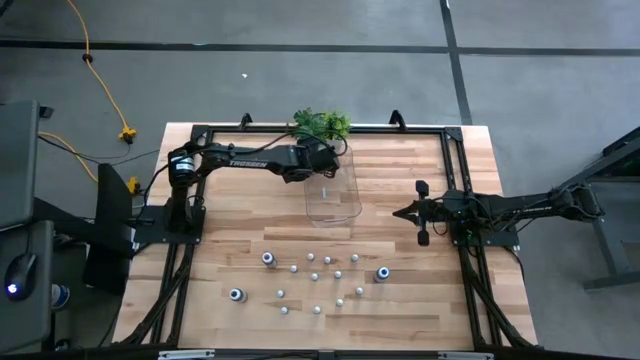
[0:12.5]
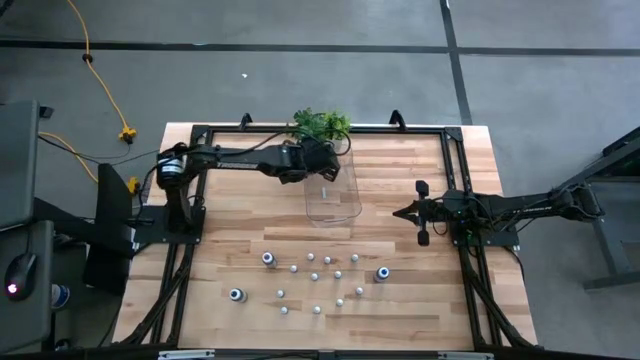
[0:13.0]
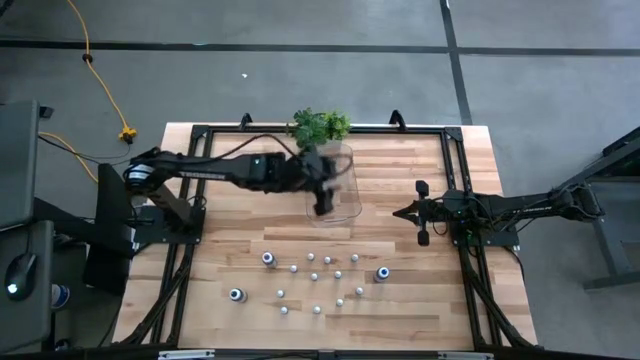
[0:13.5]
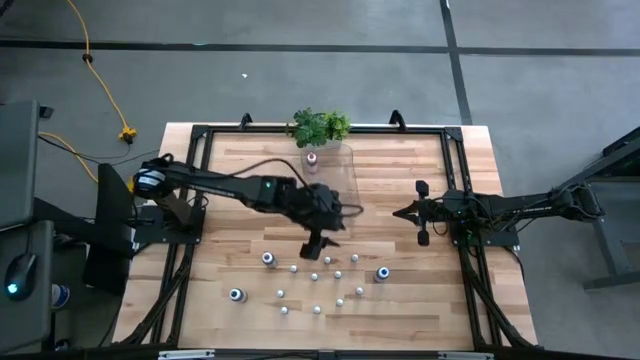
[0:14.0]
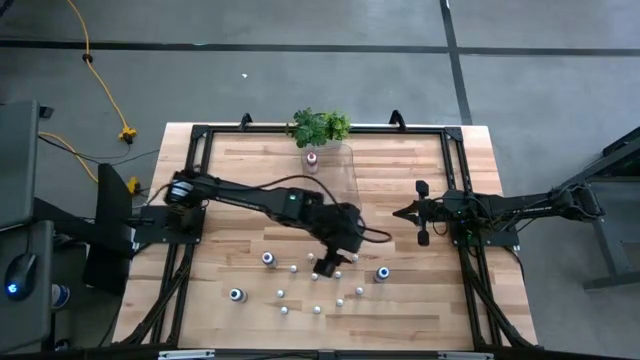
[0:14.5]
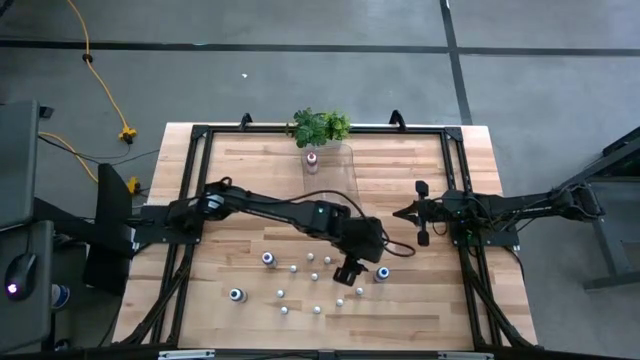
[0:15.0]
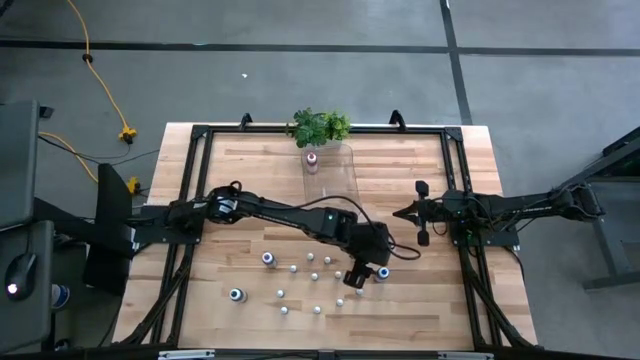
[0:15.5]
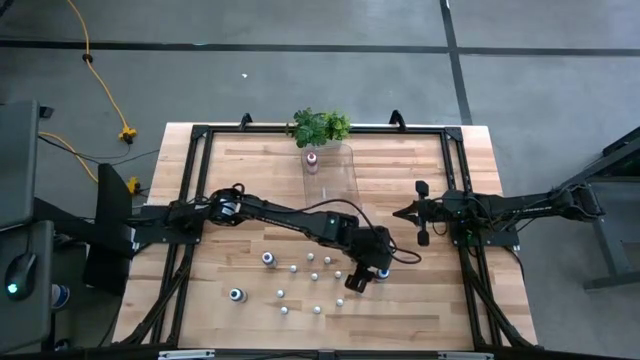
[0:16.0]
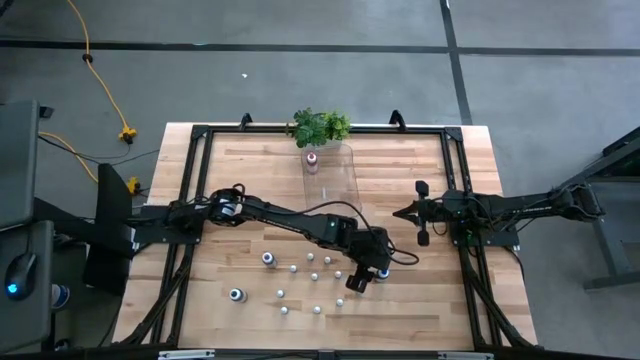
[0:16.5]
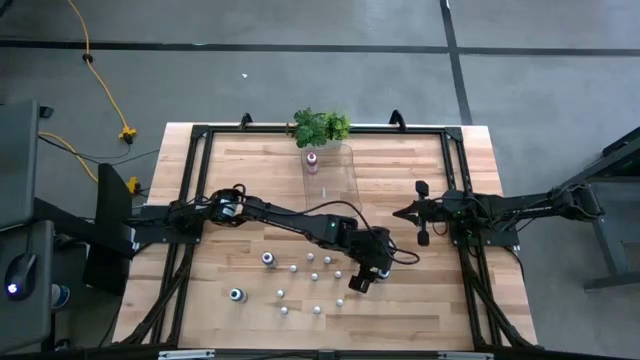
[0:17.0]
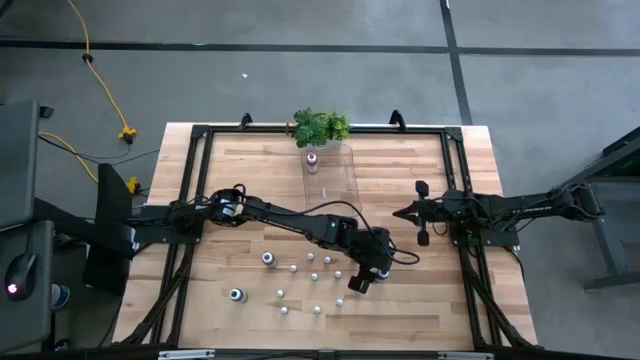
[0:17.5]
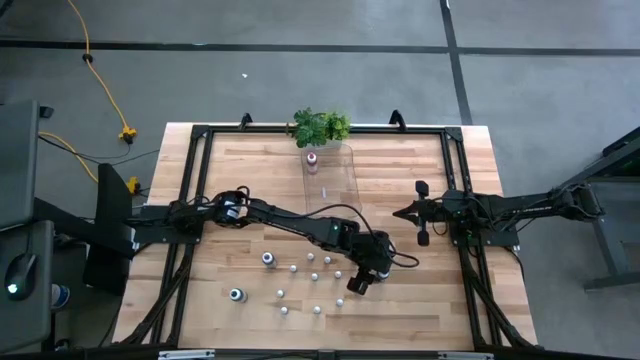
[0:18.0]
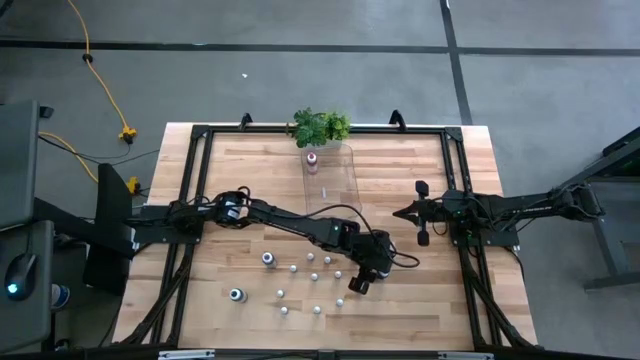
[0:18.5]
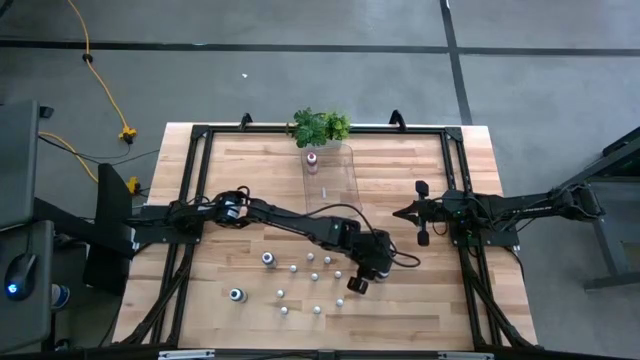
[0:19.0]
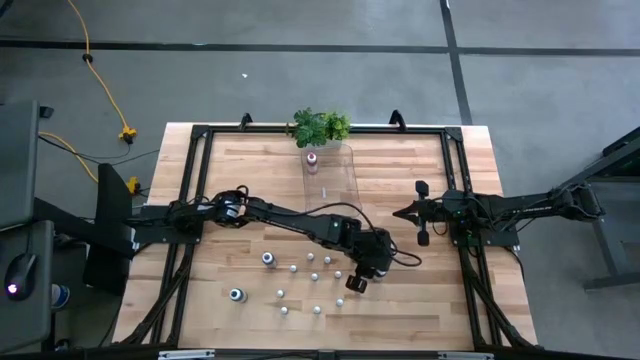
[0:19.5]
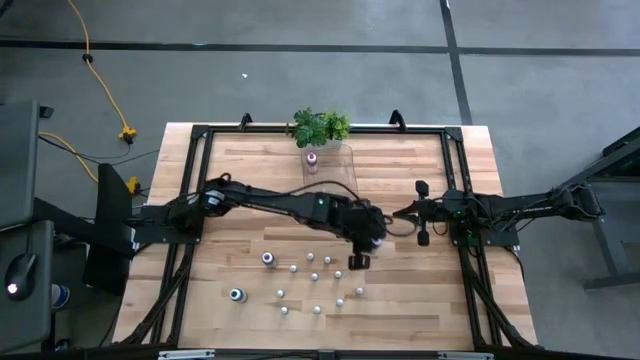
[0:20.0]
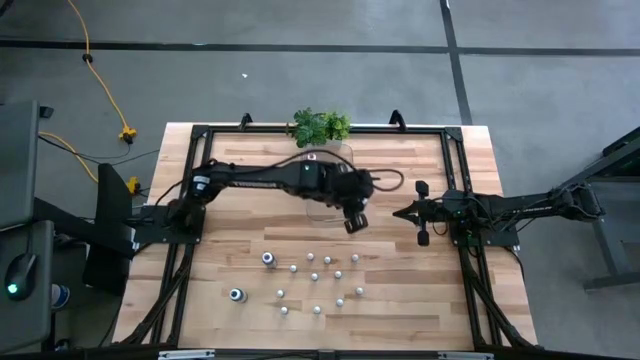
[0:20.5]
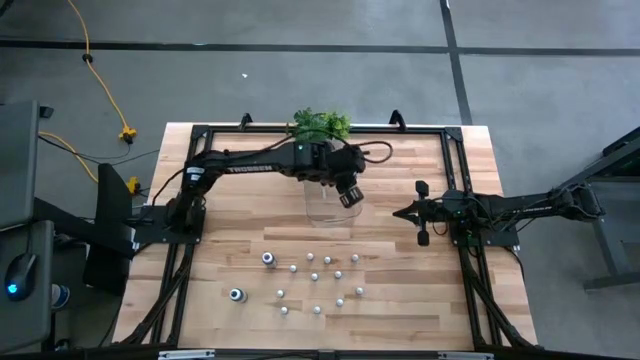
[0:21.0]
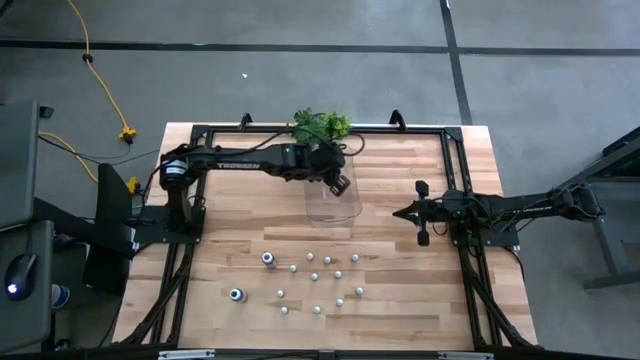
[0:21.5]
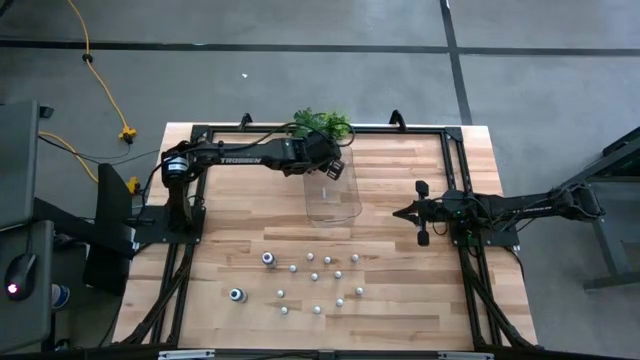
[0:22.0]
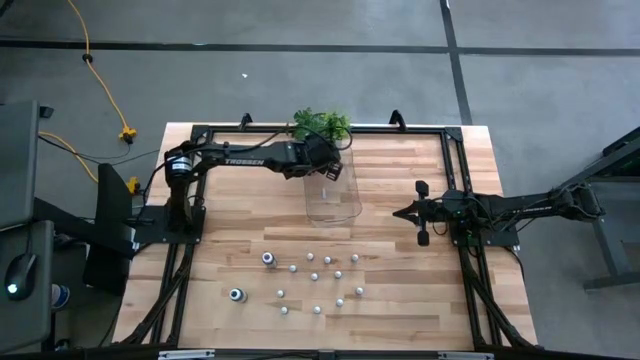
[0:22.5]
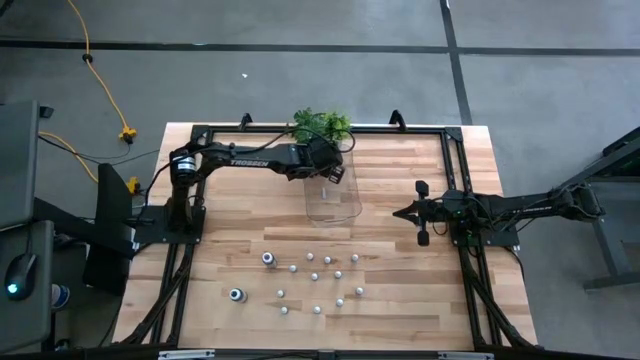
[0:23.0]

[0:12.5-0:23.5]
Task: Pick & Place food coloring
Put the large blue food coloring bottle into the transparent bin

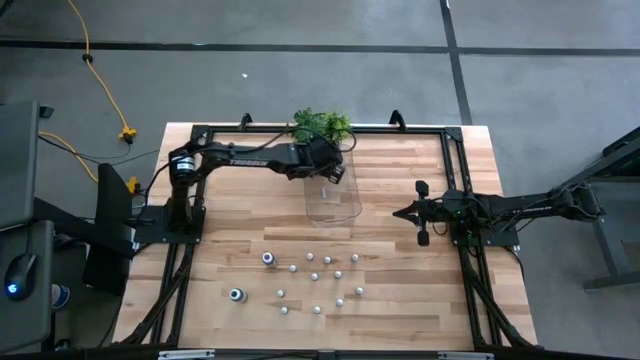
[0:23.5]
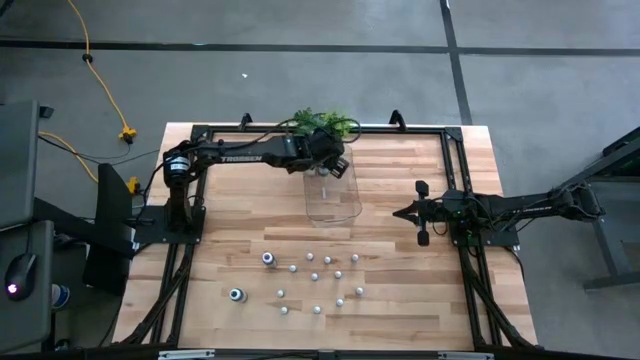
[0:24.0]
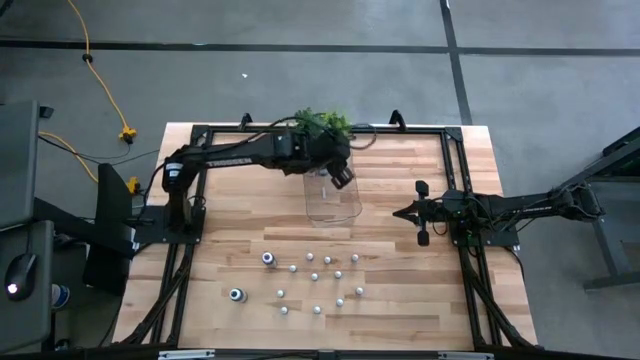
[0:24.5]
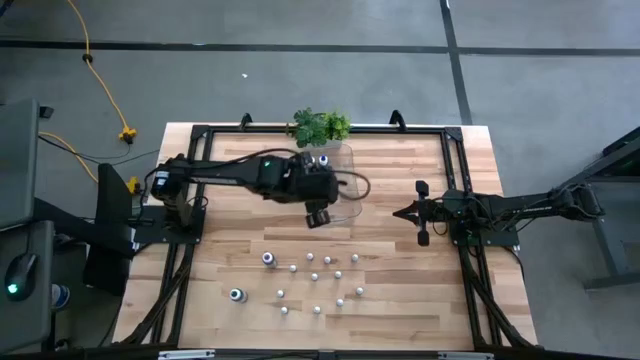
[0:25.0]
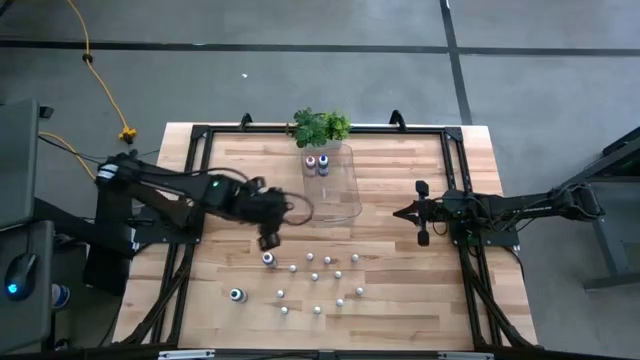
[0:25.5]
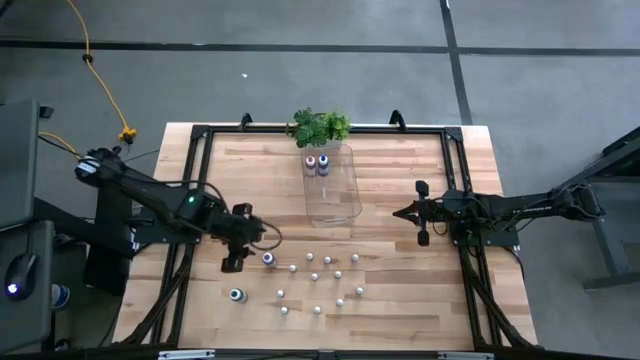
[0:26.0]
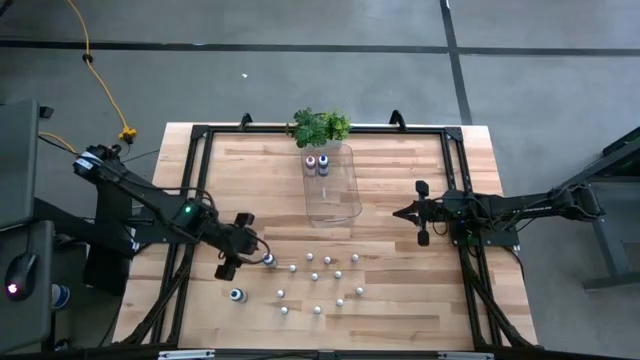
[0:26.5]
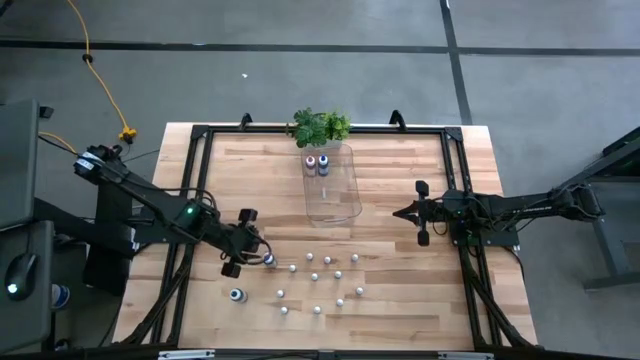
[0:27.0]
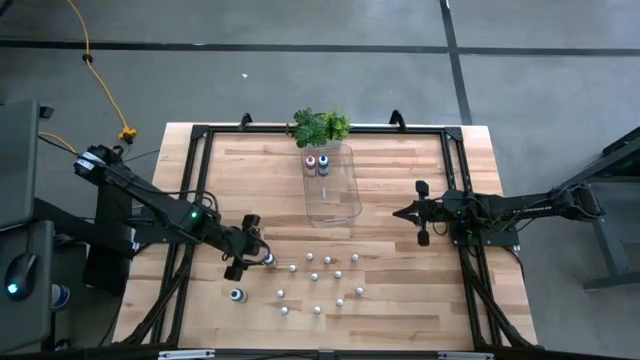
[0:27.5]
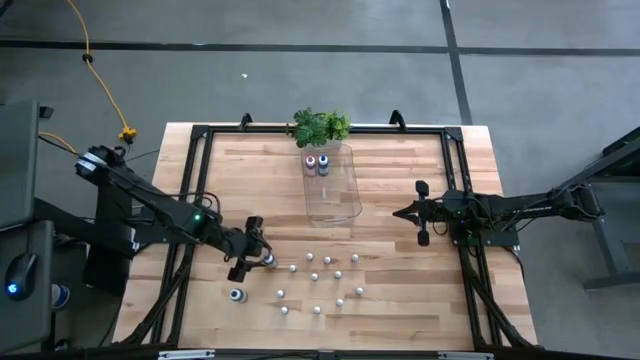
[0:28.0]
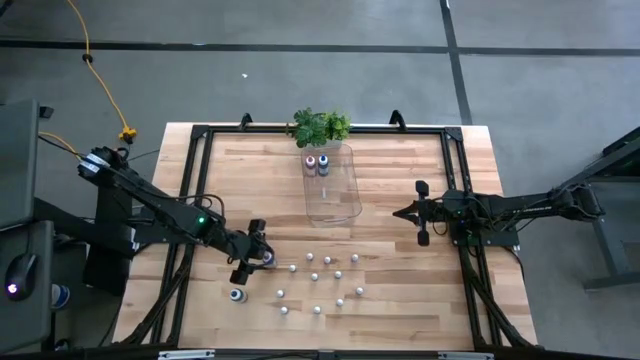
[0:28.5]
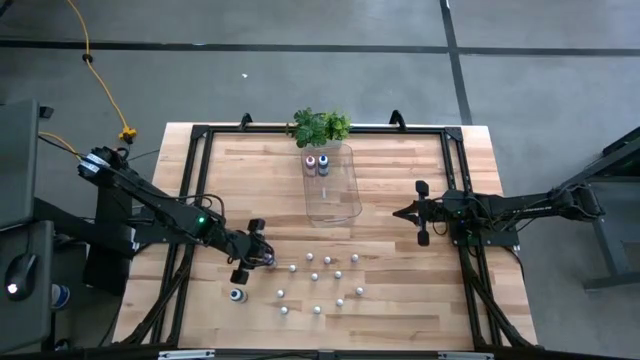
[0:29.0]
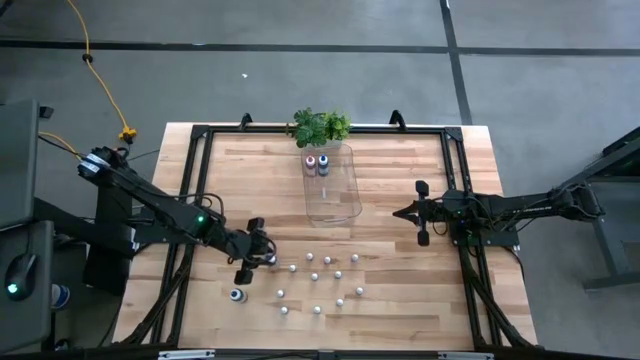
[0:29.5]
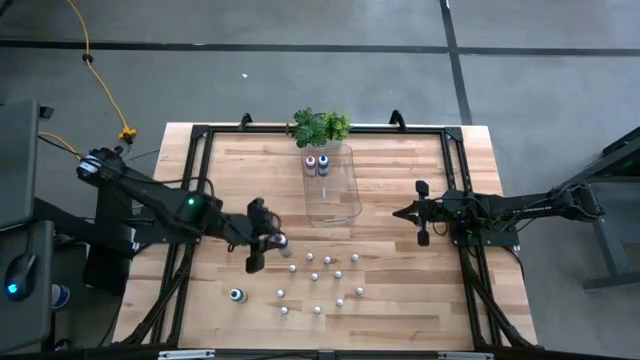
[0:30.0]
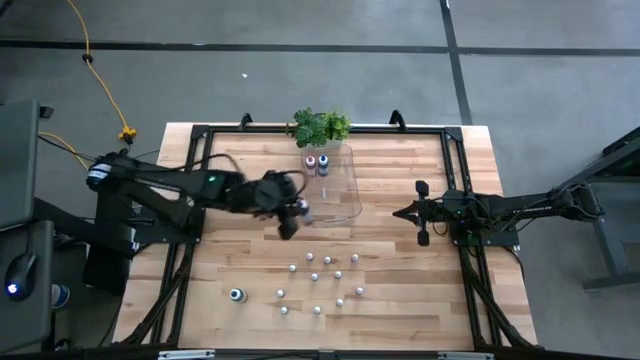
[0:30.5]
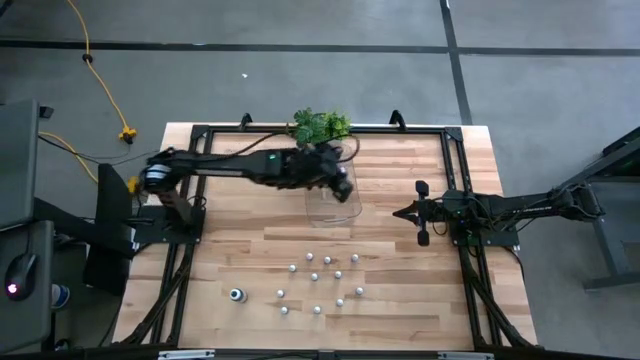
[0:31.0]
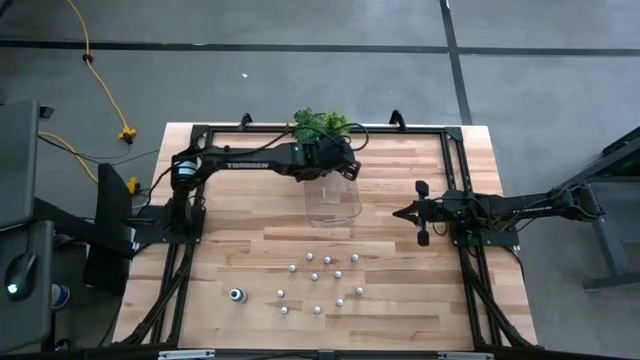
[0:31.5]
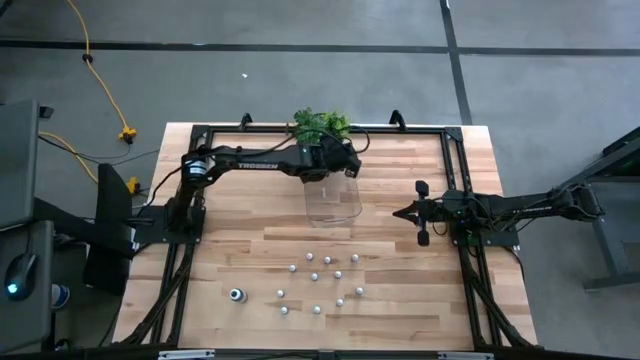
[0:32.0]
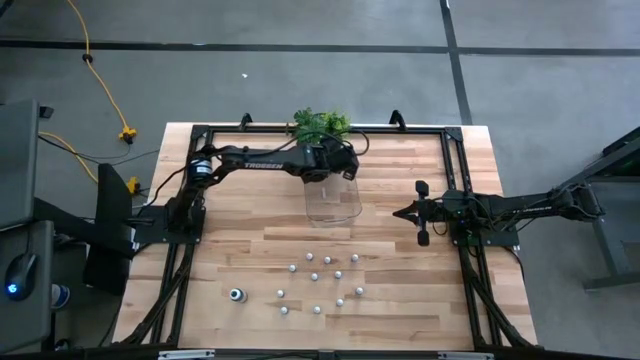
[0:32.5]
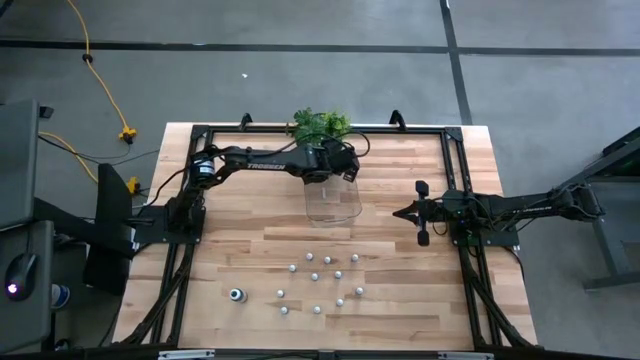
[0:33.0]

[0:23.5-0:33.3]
Put the large violet food coloring bottle into the transparent bin
